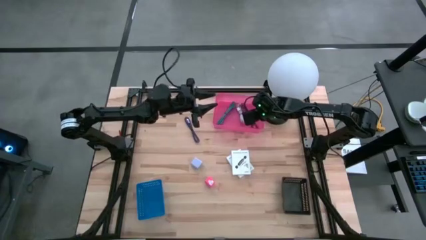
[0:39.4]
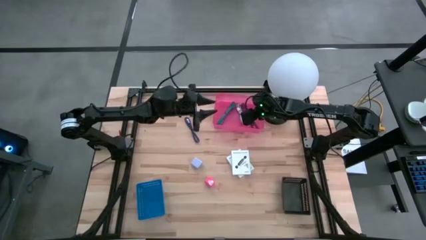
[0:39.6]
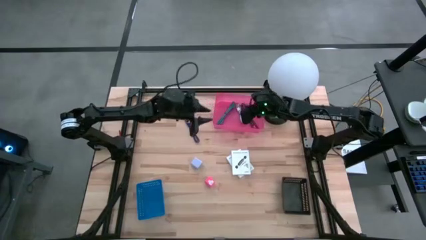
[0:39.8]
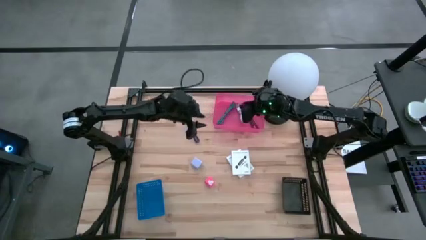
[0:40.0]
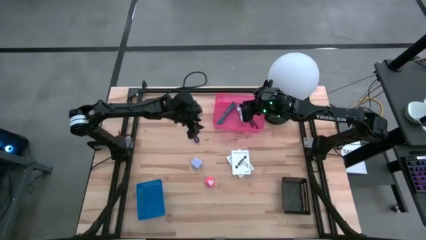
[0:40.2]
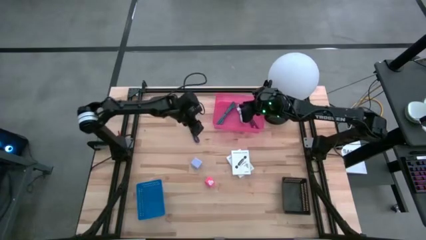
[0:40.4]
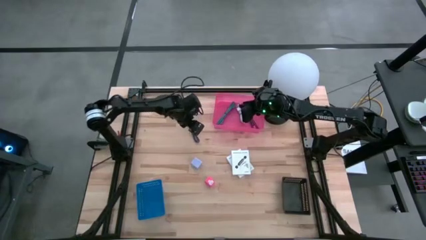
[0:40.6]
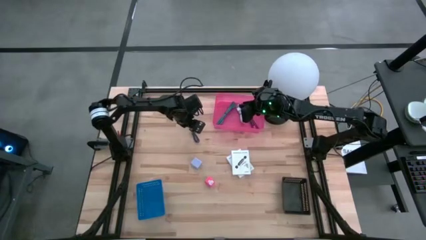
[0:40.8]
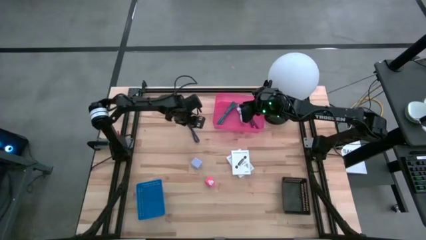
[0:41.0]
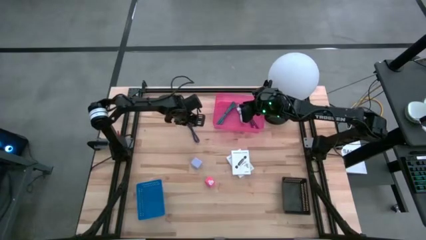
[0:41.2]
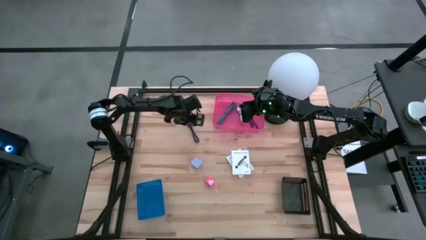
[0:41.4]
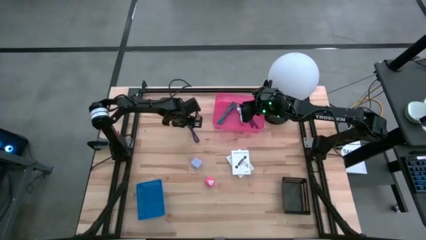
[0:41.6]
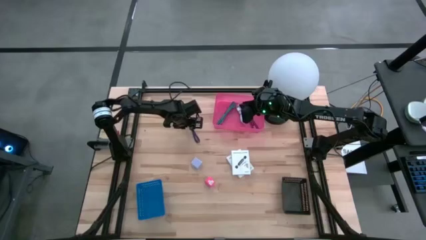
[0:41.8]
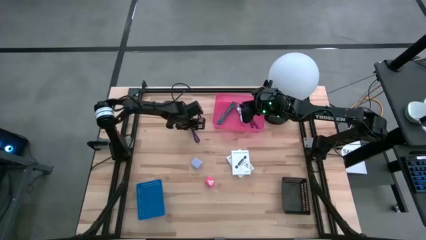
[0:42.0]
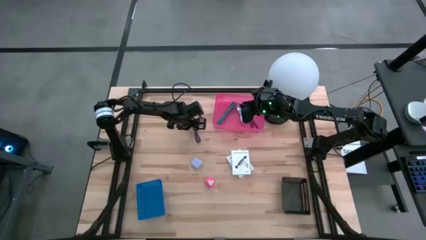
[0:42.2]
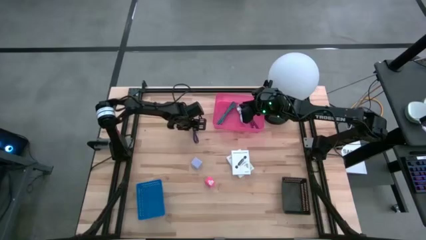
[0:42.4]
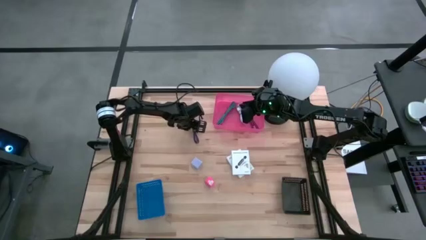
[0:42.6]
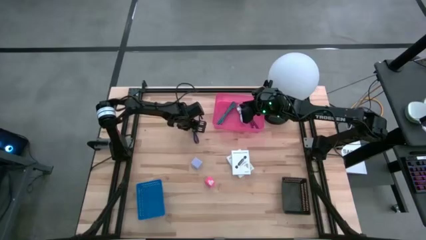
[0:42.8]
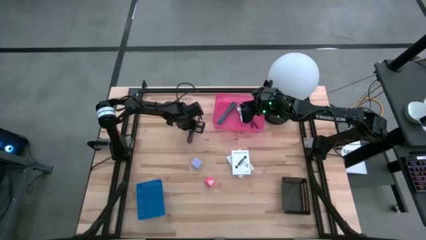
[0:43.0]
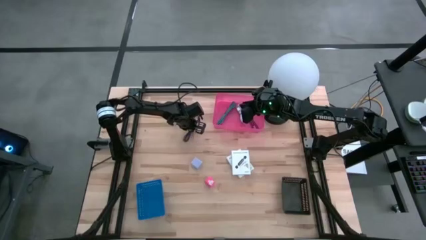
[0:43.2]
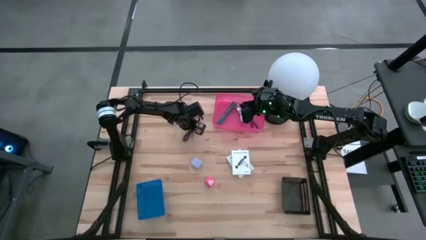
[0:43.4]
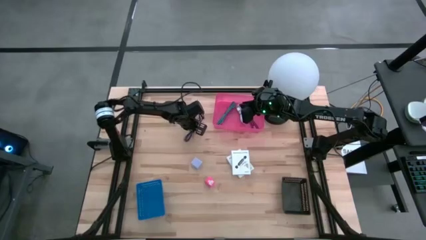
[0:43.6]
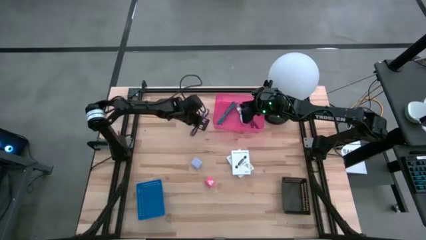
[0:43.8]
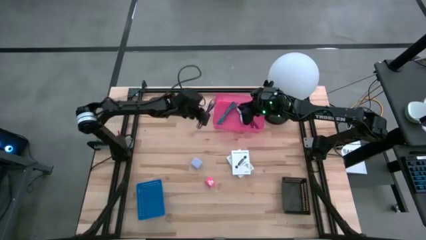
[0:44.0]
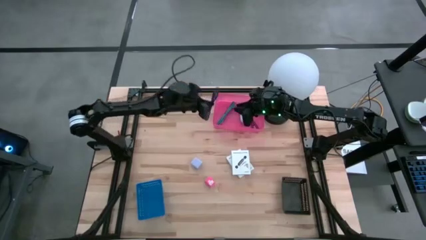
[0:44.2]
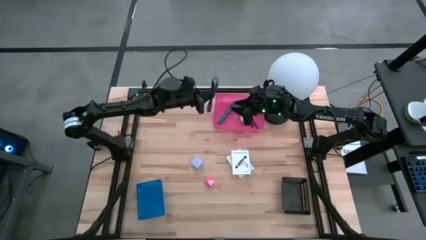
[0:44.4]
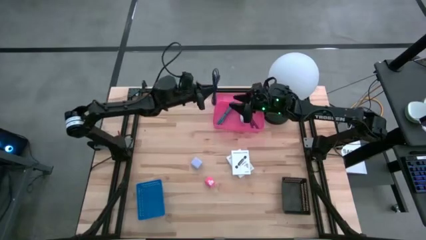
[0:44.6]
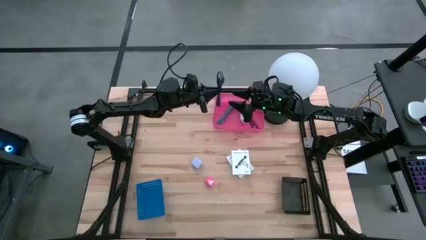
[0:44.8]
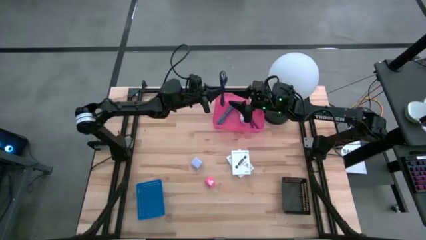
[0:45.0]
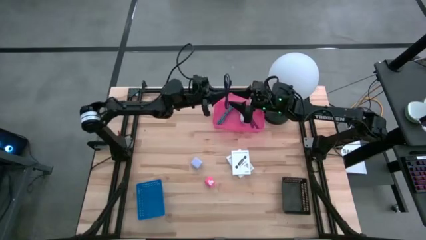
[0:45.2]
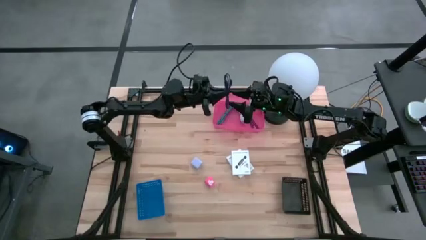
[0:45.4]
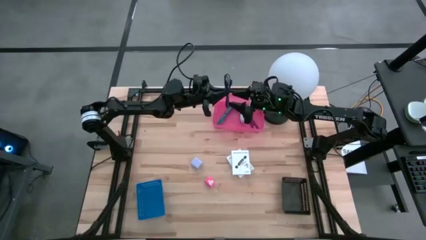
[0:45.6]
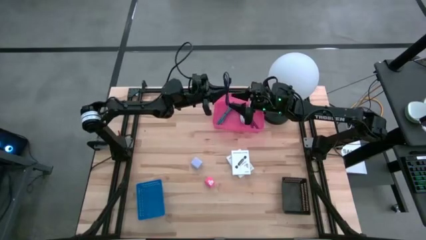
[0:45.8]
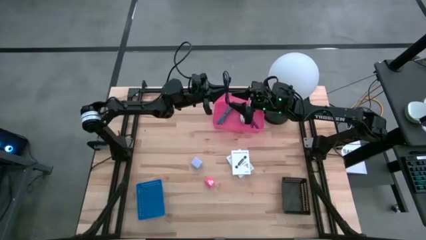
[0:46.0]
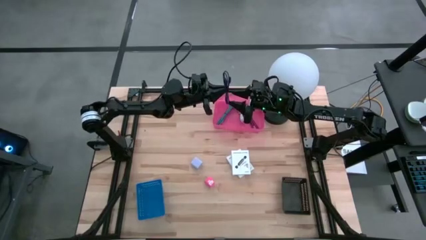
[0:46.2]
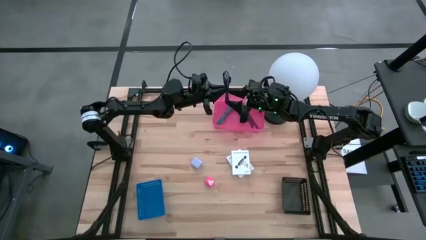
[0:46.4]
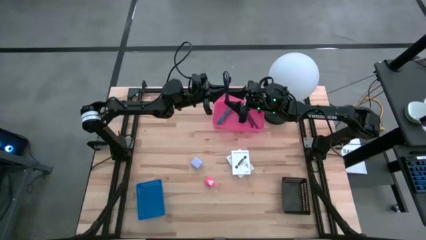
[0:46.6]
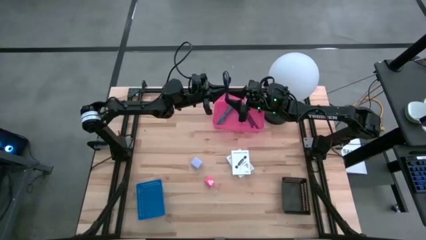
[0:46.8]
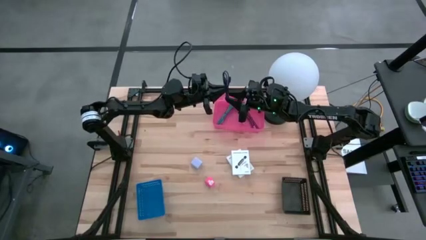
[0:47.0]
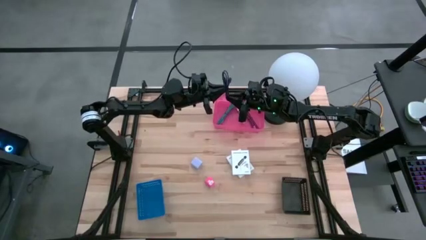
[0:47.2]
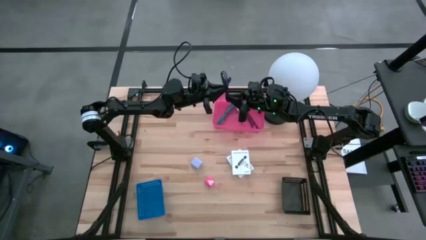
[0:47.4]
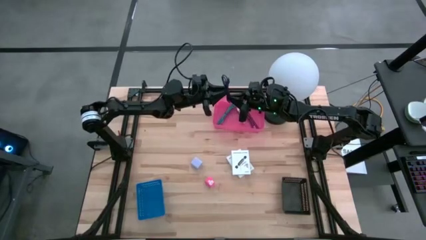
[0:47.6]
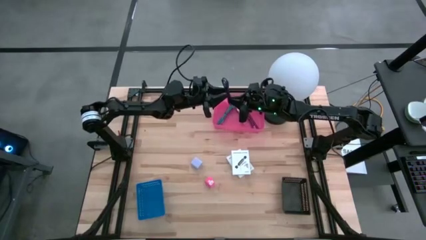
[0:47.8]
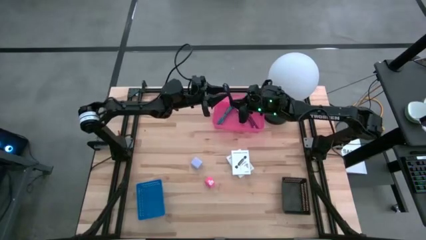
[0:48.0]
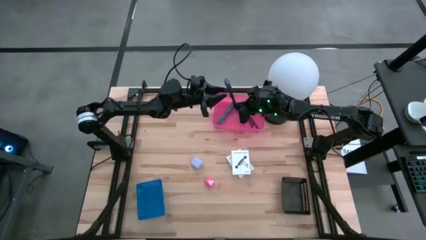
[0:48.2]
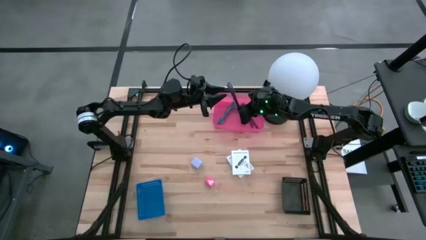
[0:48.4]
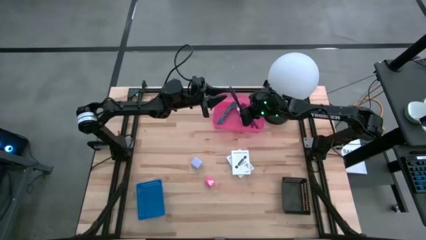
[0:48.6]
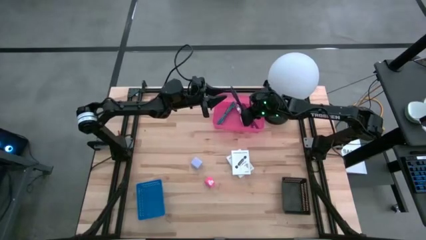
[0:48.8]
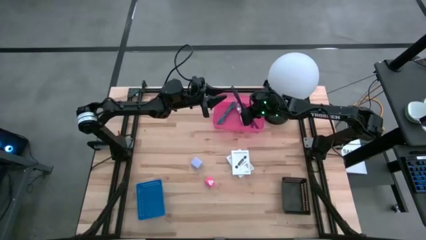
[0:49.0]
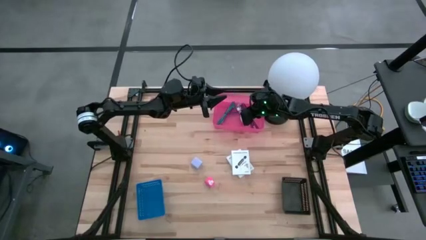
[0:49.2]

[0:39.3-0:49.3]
Task: Pick and place items into bin
Put the blue charger cable into the pink bin

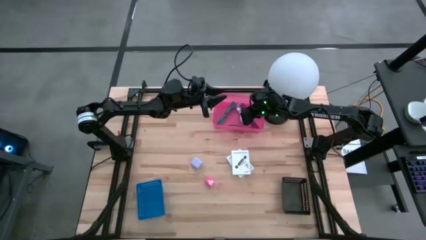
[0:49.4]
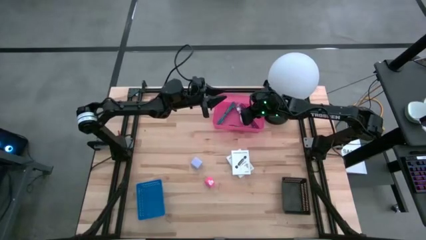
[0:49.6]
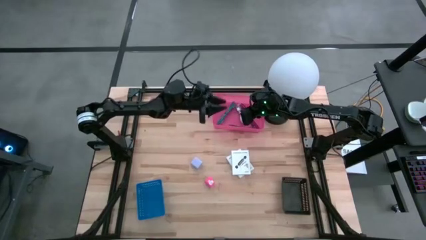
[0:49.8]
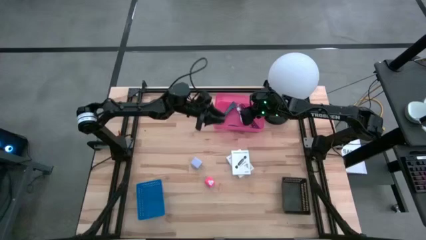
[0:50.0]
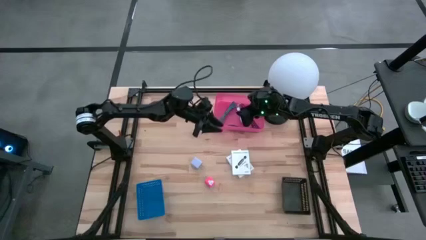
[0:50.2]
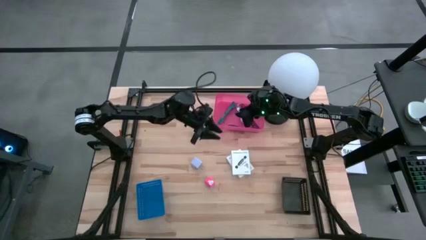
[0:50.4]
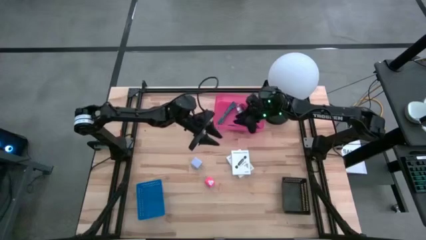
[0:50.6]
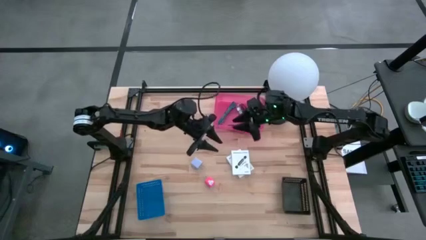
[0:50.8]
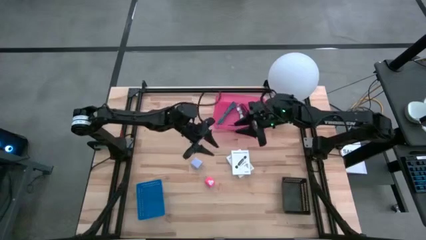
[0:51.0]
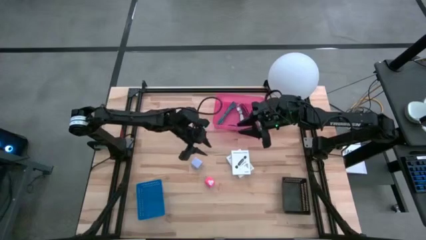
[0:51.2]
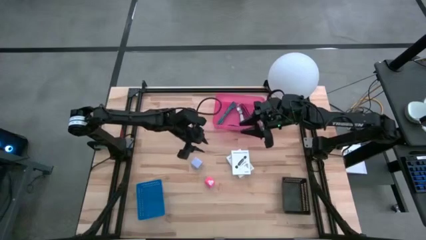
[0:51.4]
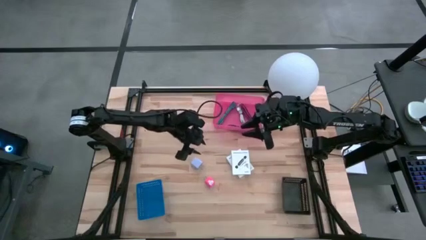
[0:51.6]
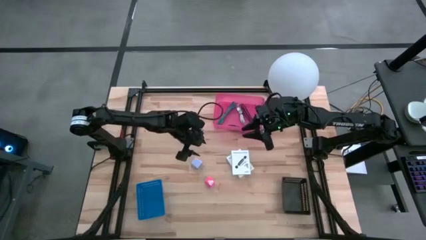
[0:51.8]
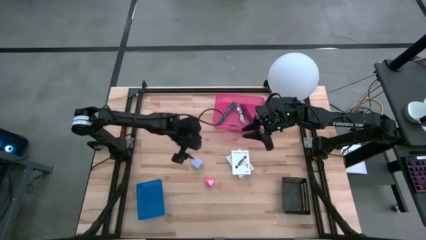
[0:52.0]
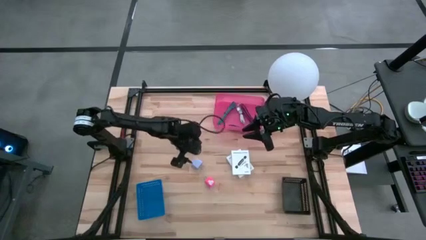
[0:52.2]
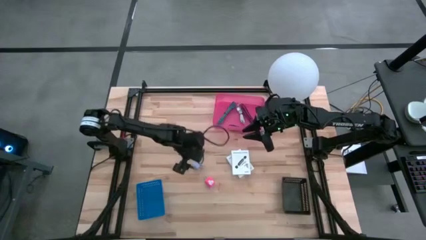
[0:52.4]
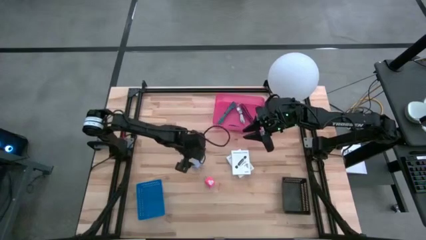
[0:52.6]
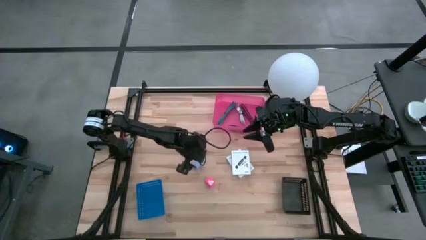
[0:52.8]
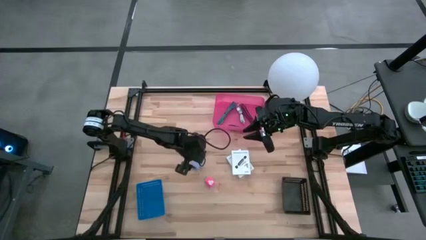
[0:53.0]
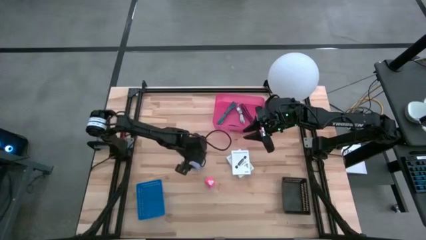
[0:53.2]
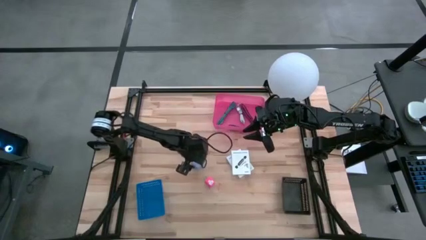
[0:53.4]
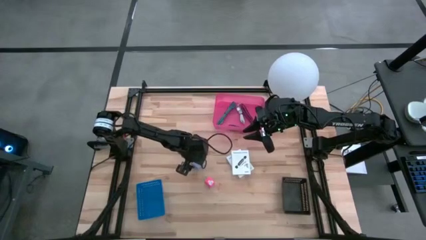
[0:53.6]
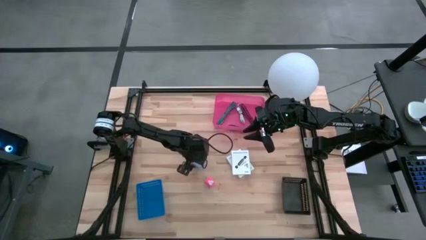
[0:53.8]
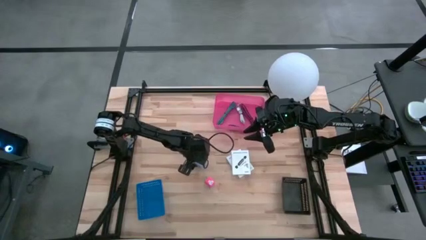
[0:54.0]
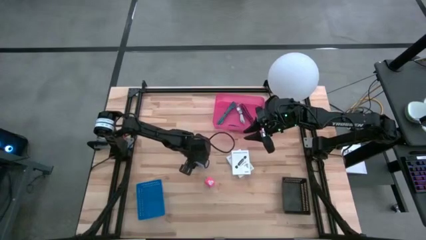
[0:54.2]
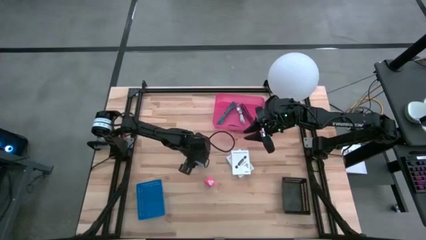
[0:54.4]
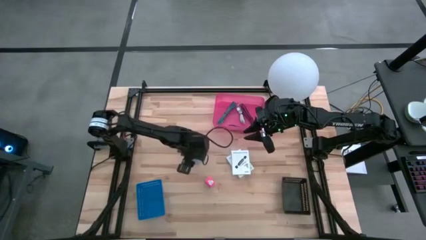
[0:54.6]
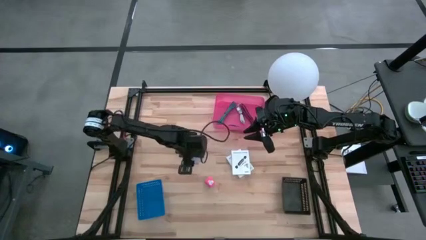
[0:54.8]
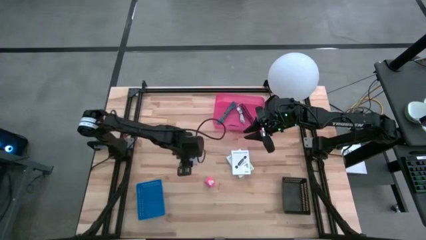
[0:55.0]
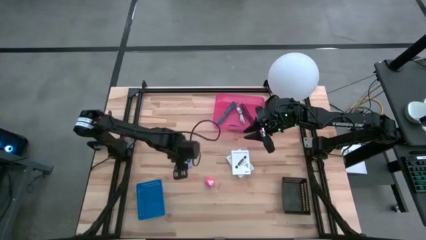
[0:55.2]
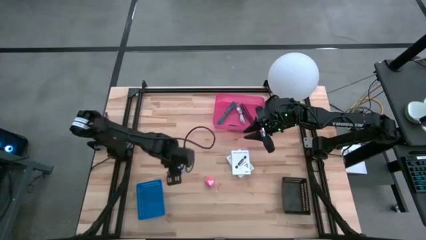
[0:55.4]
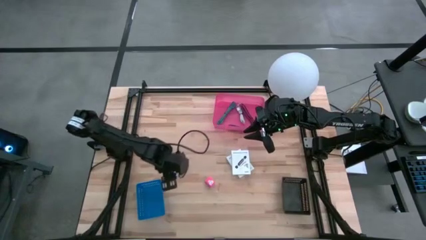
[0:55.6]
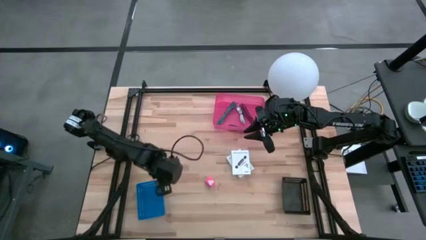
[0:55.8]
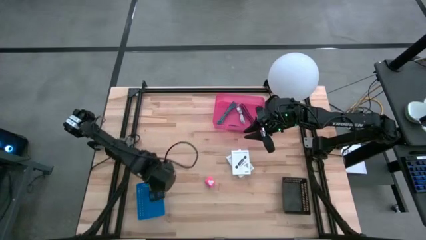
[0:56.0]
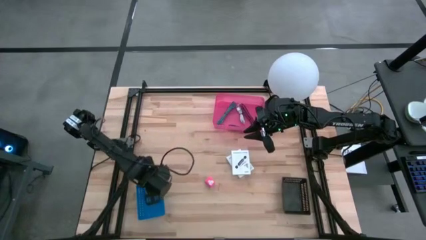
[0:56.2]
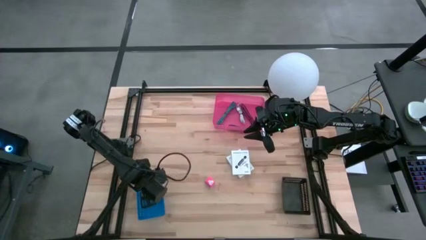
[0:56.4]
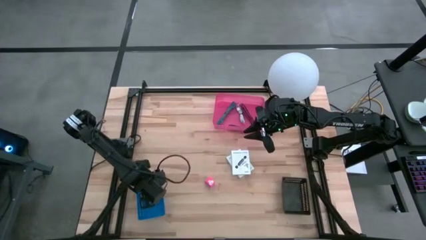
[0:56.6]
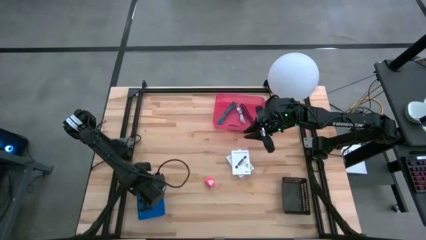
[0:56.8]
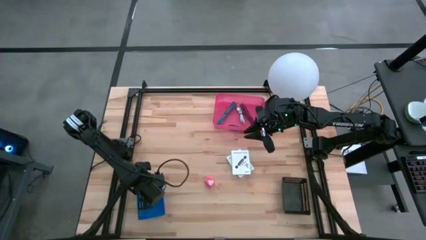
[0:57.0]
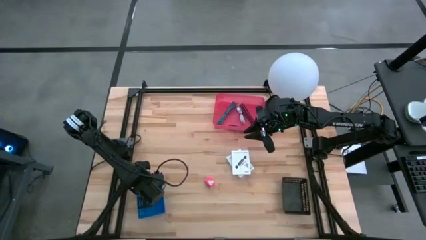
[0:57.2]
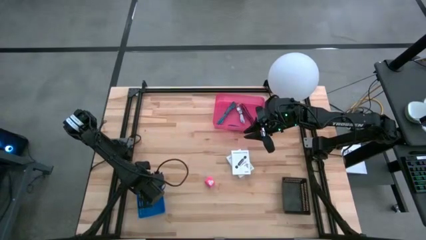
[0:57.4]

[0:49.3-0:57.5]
Put the white charger adapter into the blue bin
